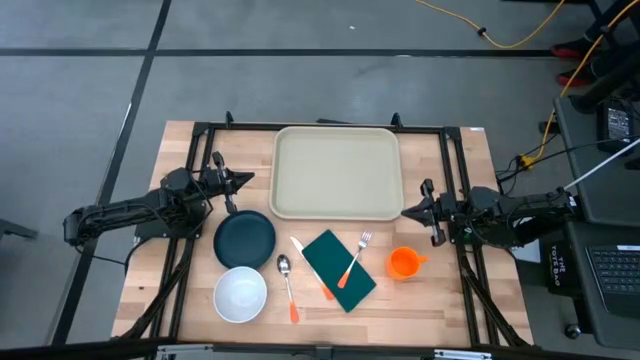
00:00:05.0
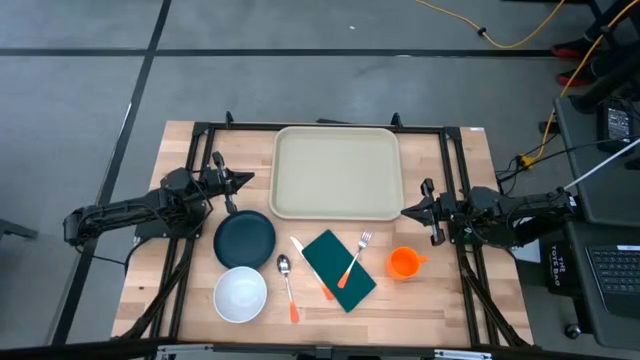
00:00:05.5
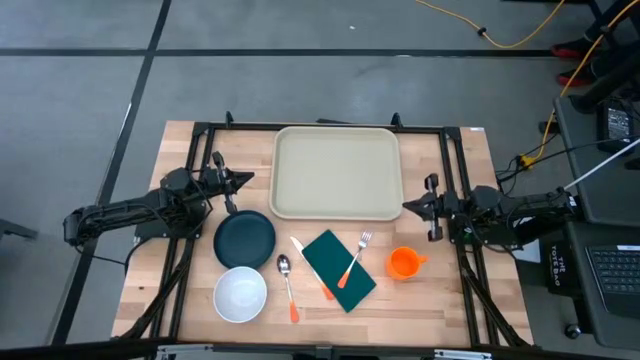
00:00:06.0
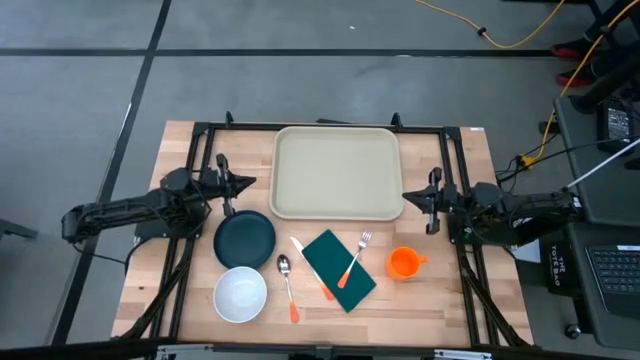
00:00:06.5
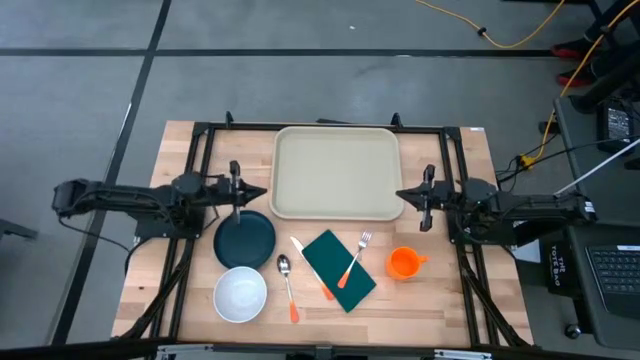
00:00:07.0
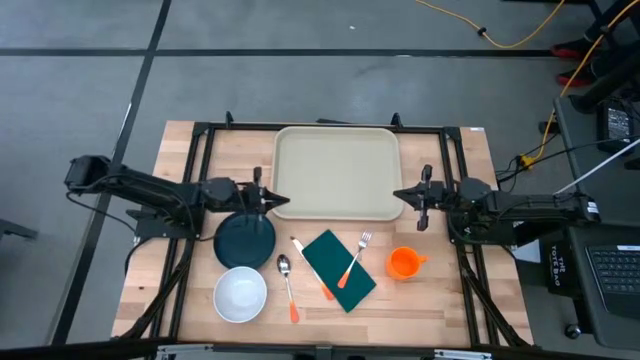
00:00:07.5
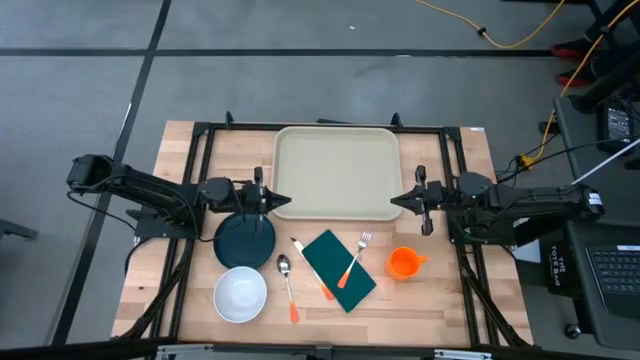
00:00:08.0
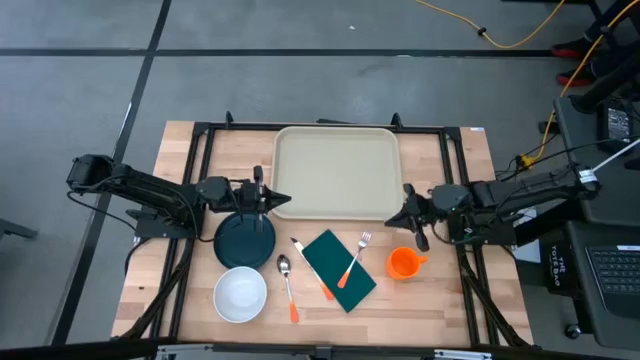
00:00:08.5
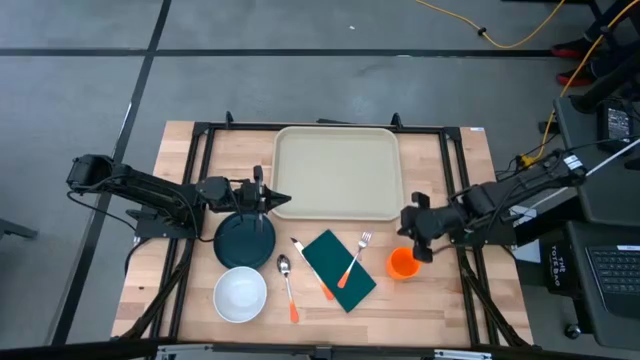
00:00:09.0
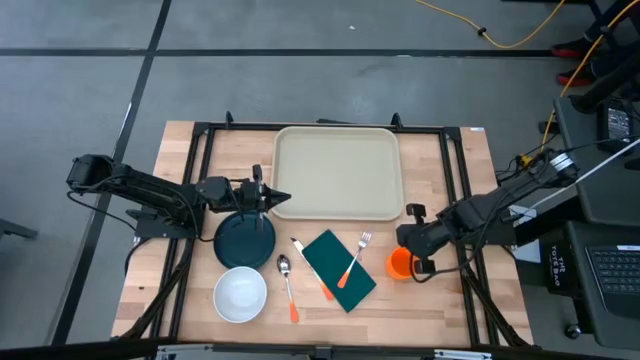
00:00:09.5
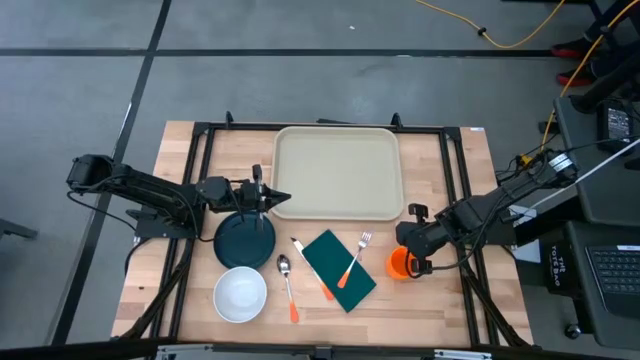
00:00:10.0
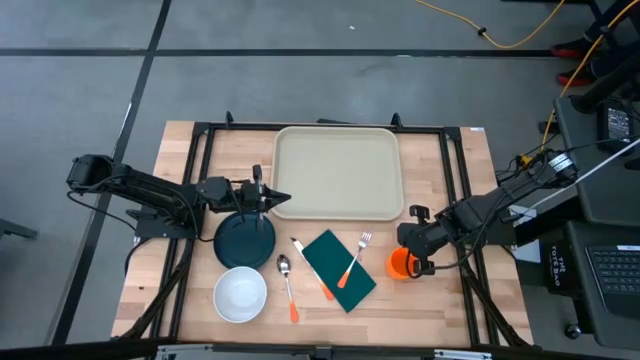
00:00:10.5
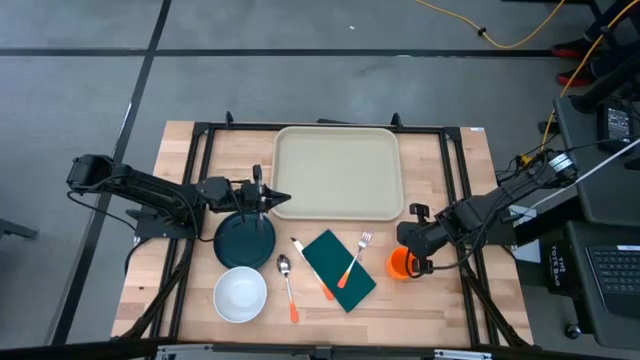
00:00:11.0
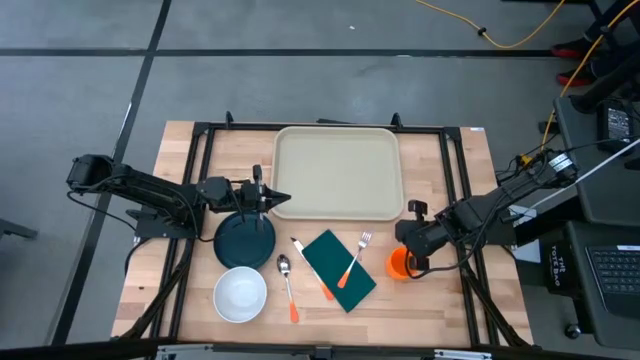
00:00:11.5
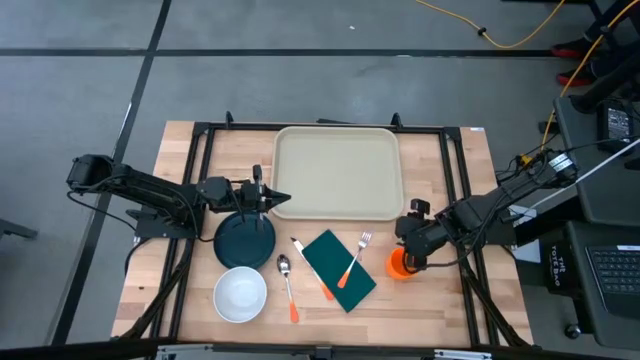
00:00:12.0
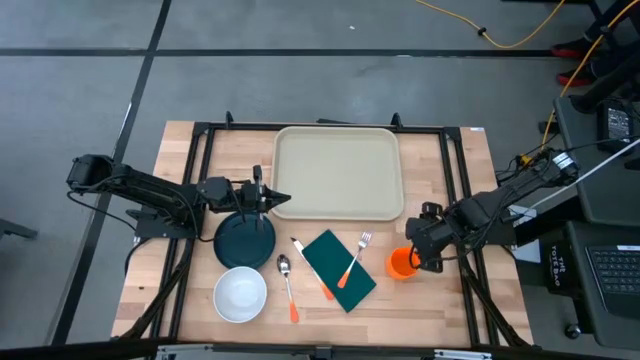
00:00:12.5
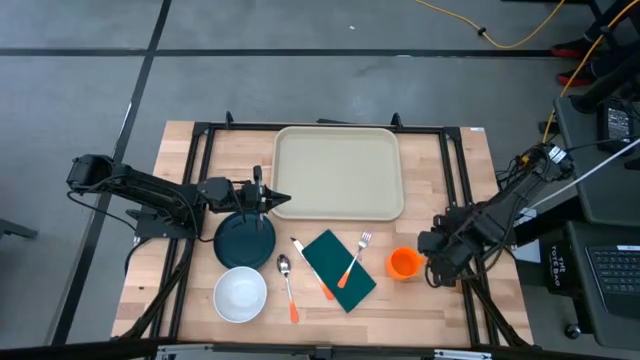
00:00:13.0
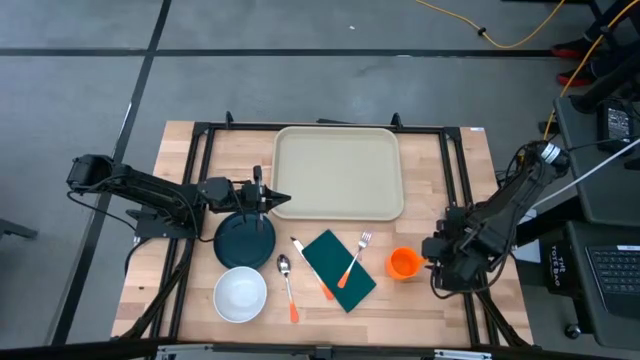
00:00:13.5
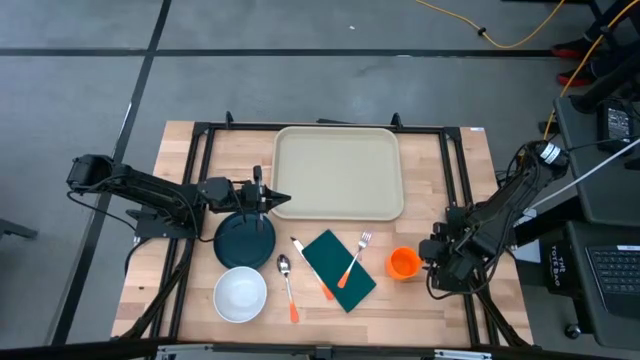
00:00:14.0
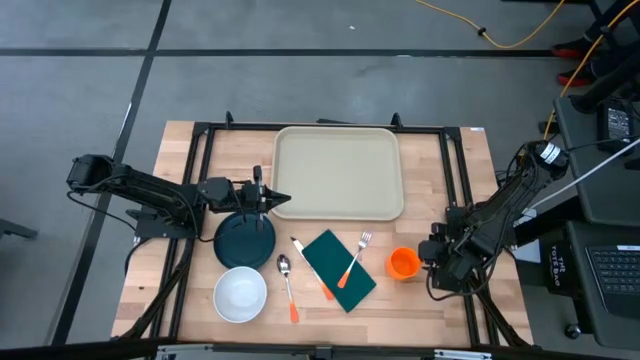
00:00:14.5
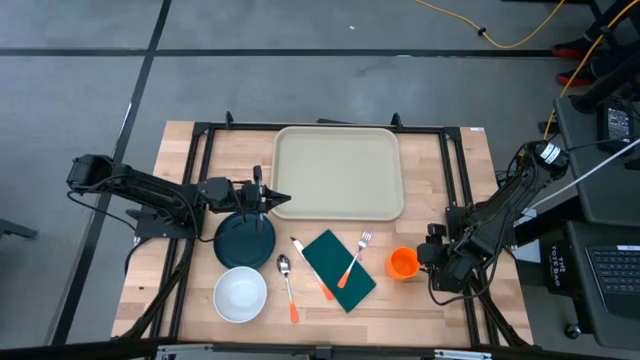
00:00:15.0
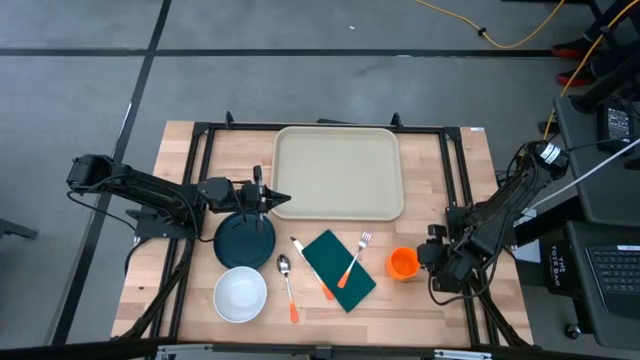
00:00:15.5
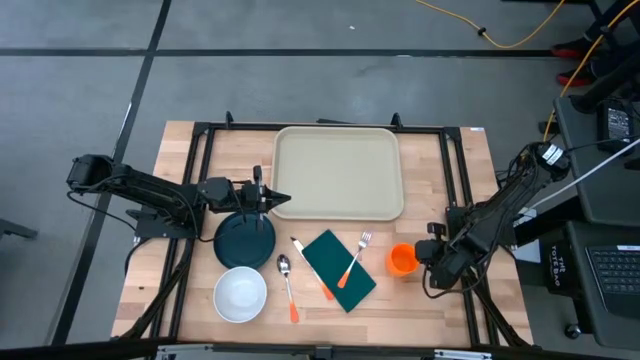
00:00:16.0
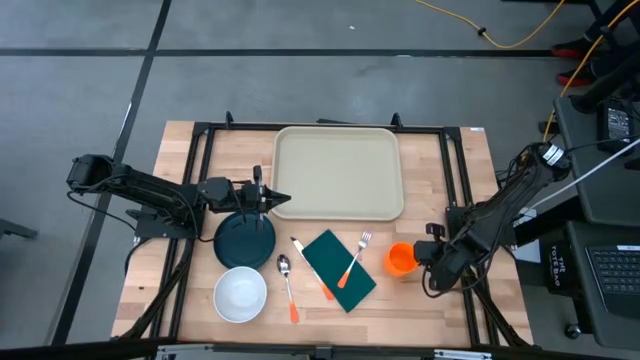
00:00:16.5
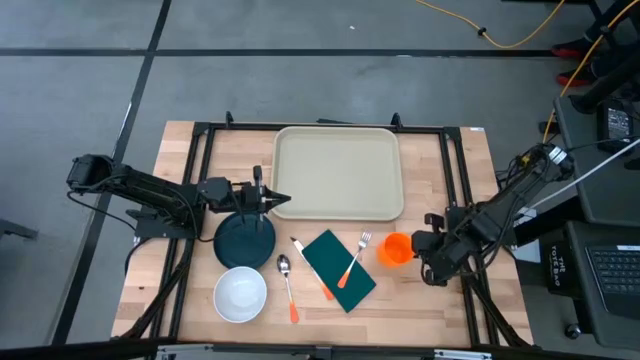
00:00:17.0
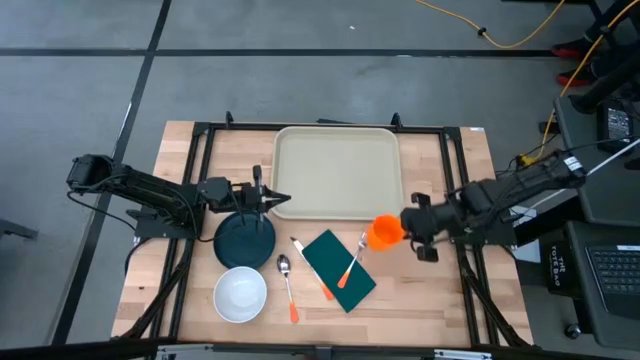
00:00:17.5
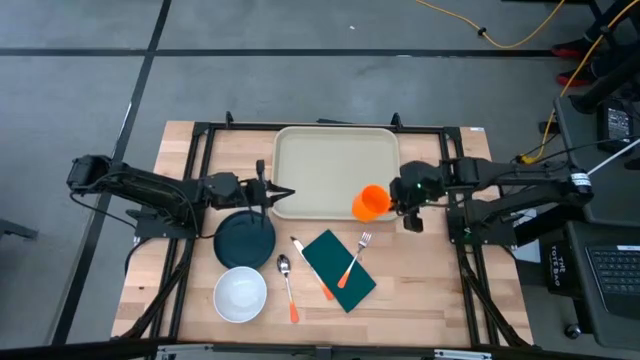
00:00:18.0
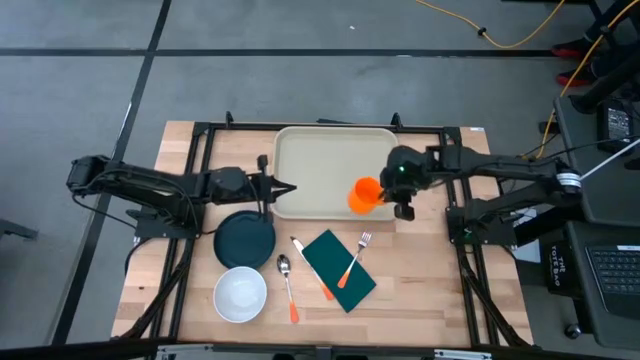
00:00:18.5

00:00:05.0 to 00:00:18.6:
Task: Set up tray
Put the orange cup on the gray tray

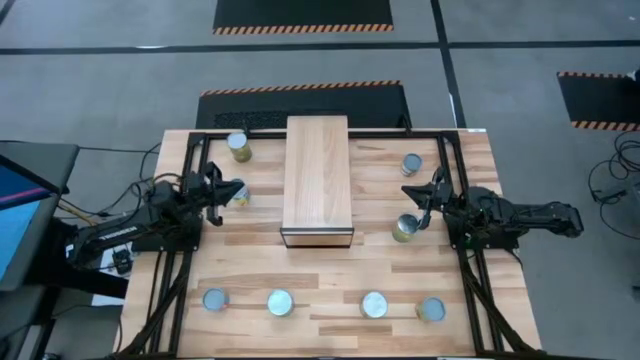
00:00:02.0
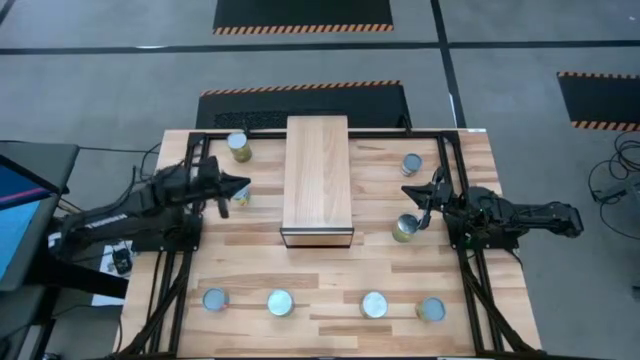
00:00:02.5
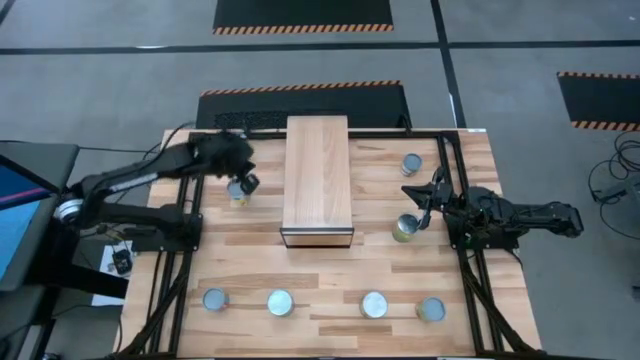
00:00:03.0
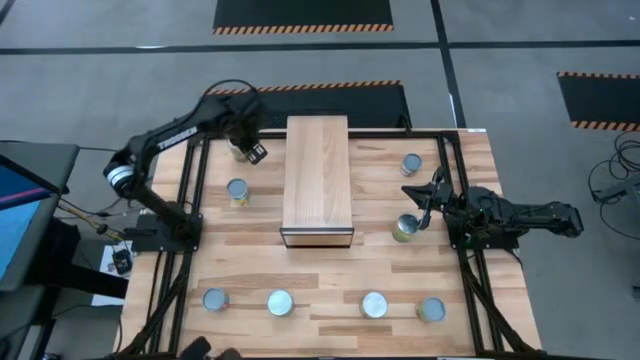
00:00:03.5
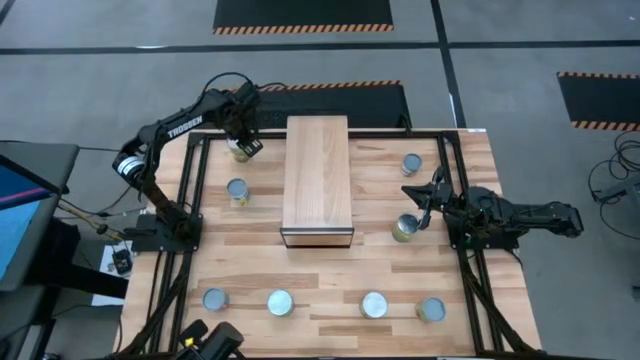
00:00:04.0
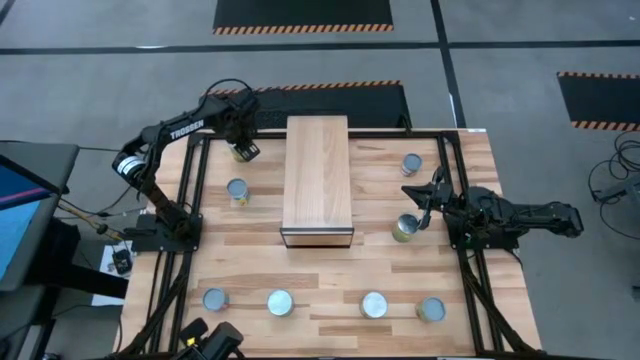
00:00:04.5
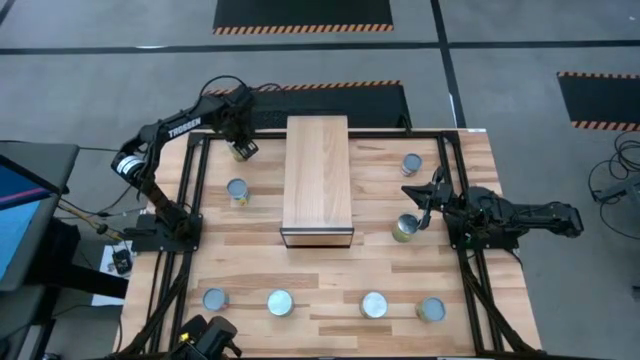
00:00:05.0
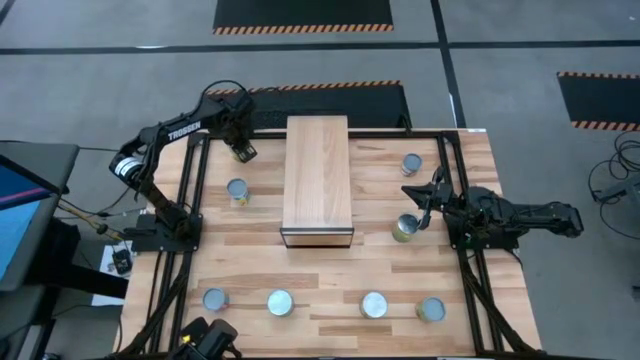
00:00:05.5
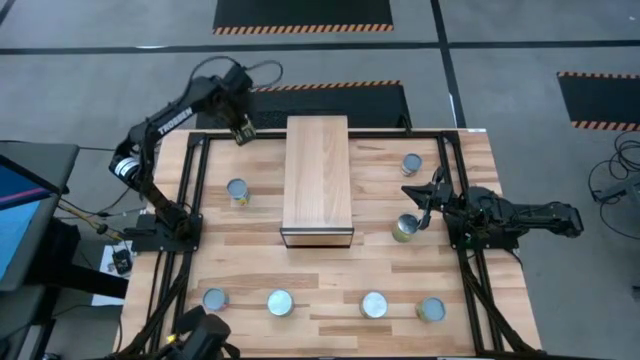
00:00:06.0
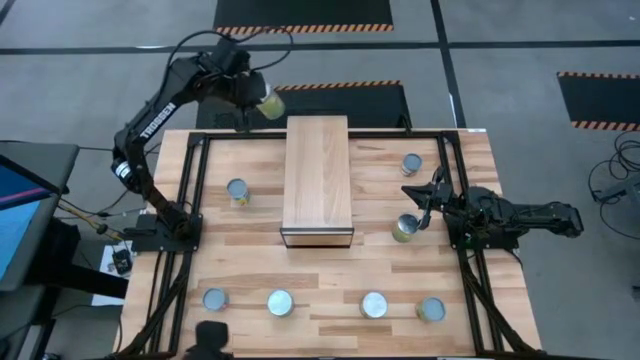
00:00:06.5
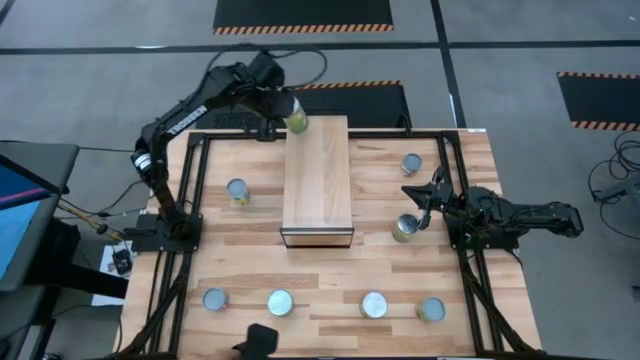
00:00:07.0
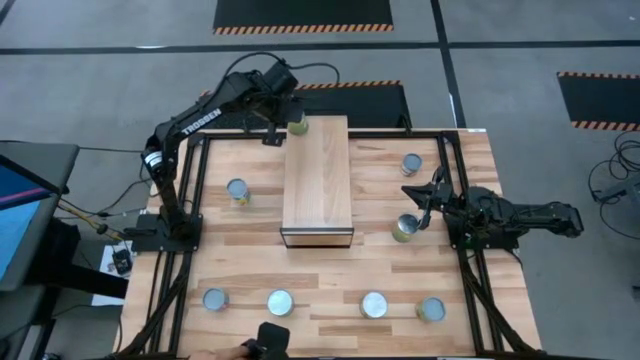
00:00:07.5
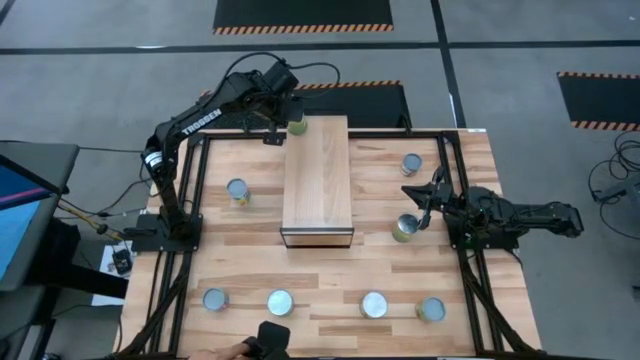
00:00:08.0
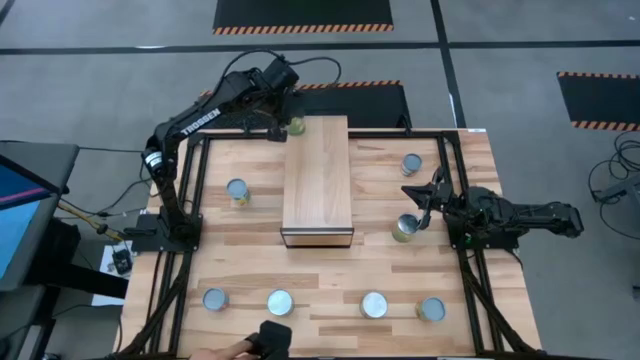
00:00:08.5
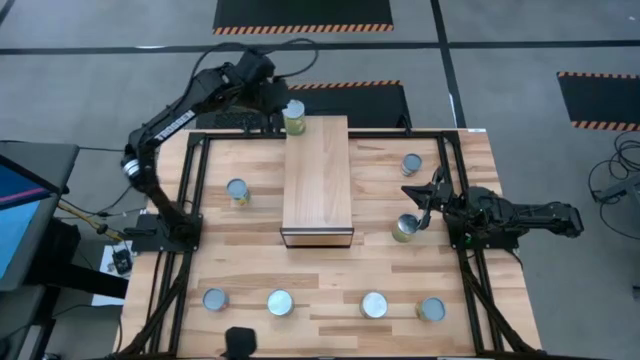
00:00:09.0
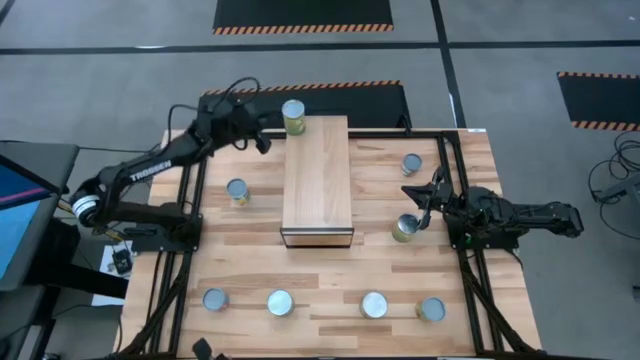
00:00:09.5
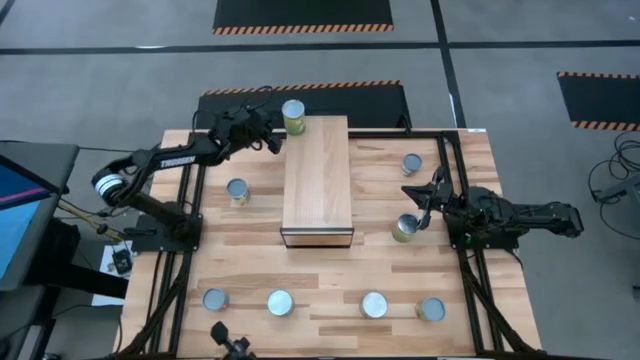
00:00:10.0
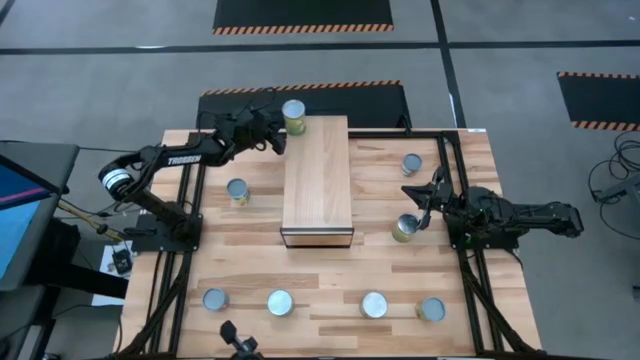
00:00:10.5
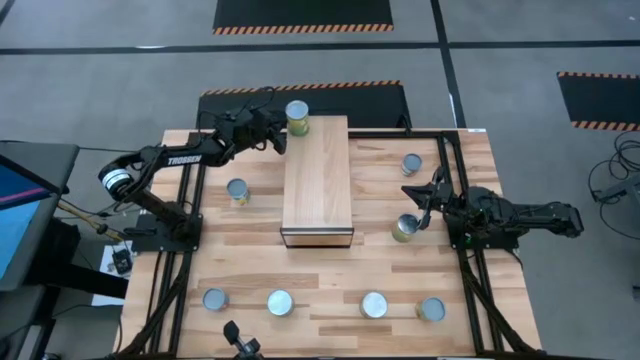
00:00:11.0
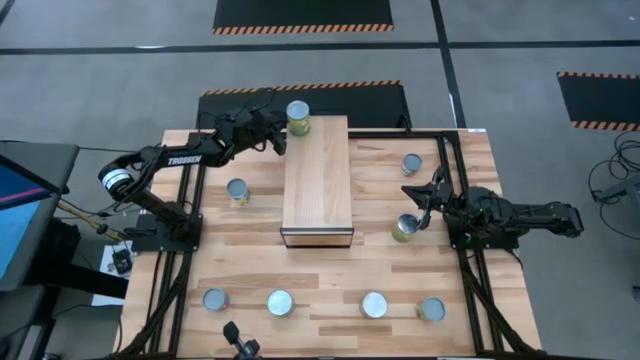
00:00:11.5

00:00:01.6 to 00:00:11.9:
Task: Pick and place cans onto a shelf
Put the top canned pears on the shelf
